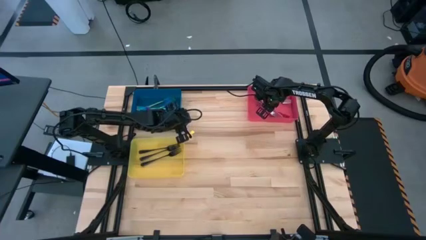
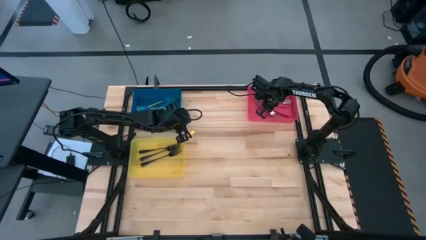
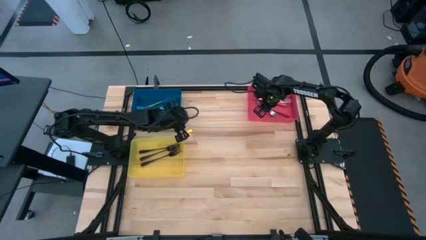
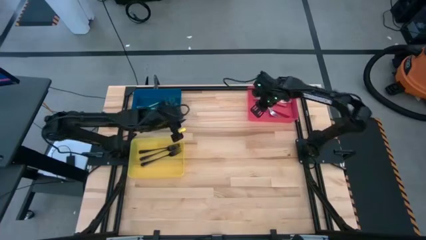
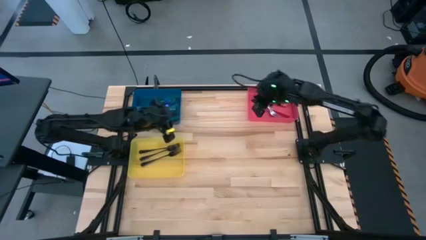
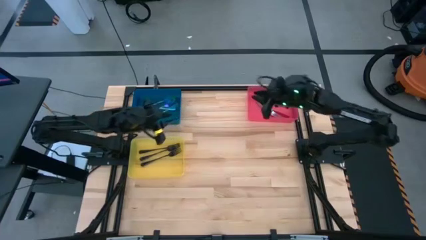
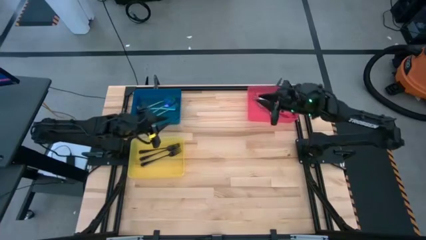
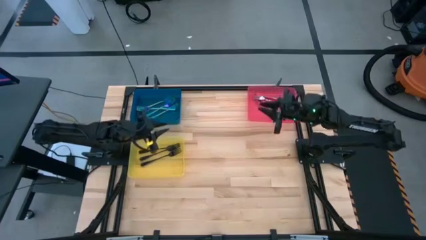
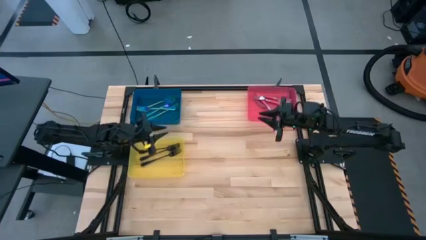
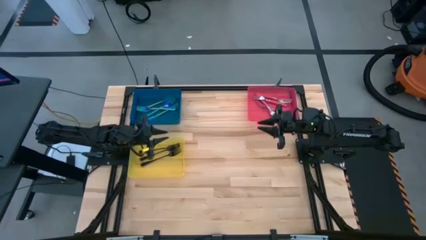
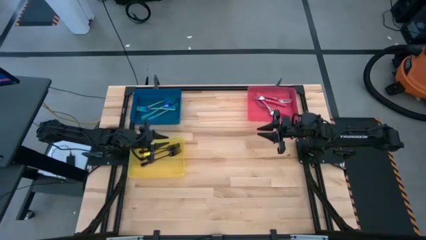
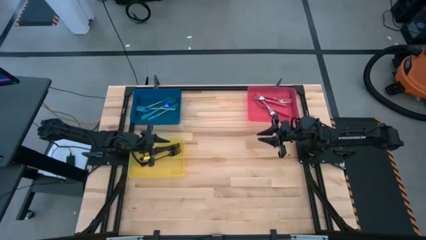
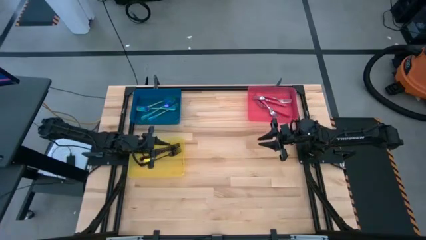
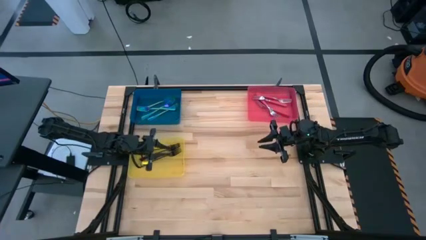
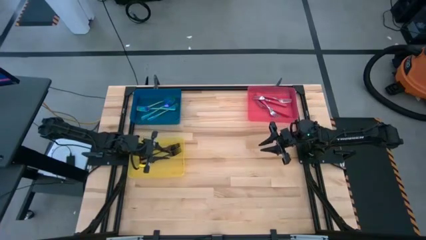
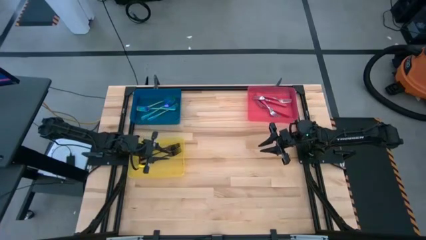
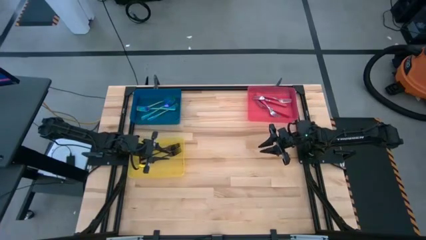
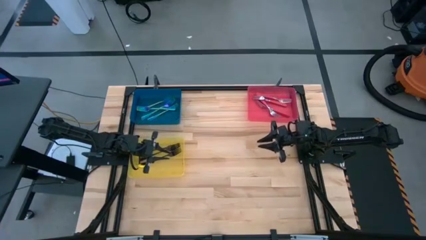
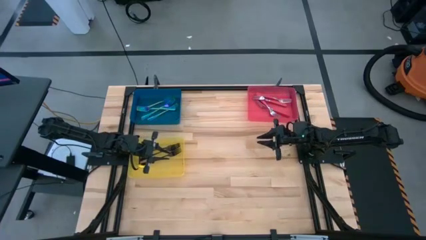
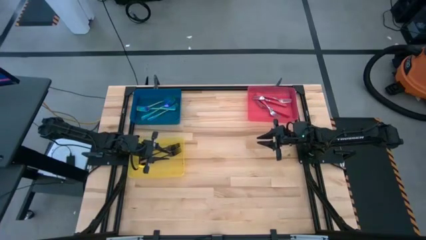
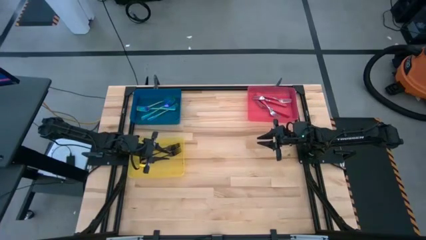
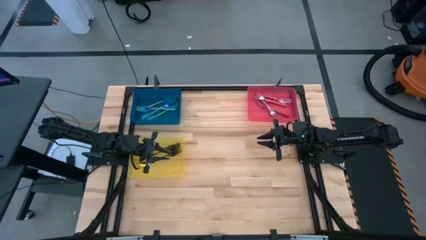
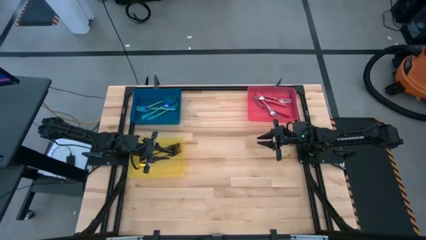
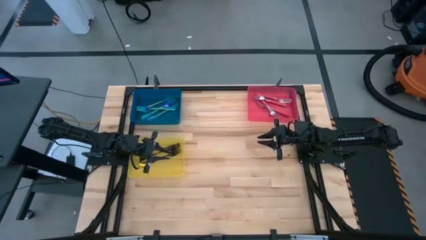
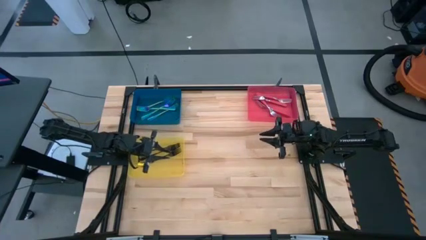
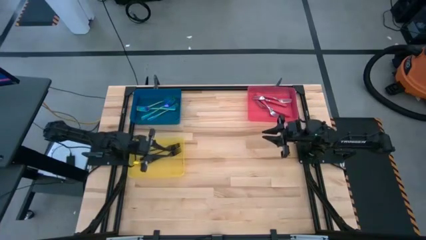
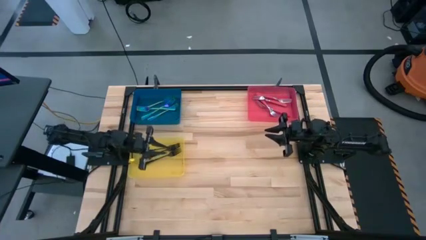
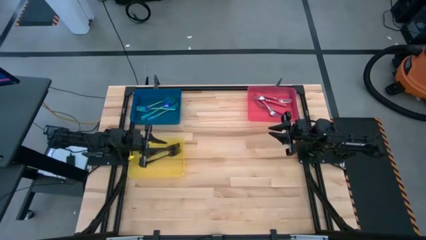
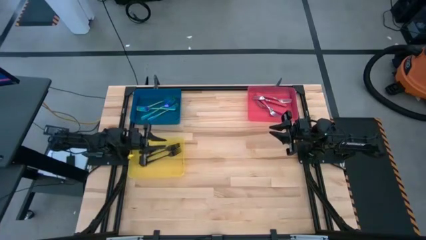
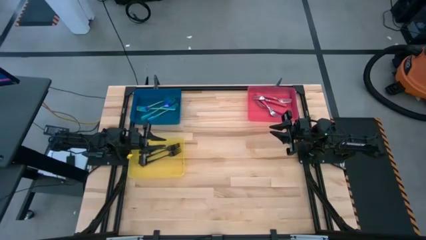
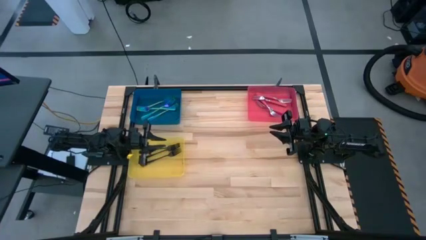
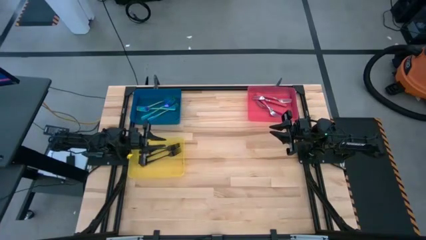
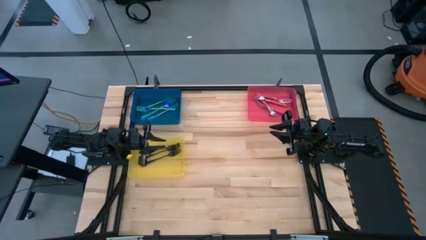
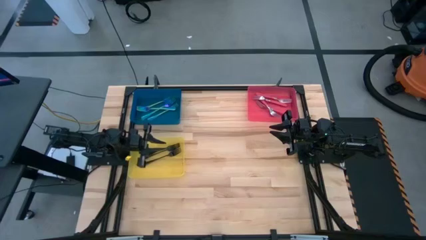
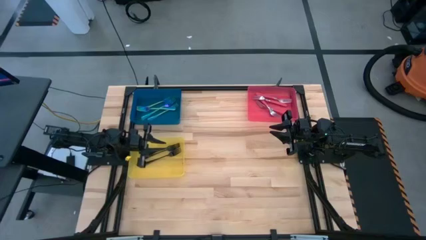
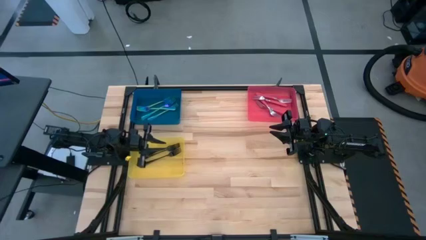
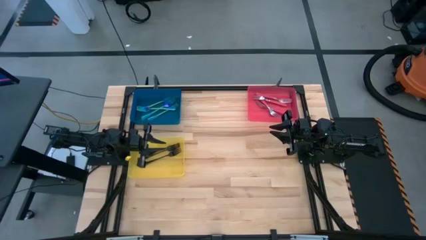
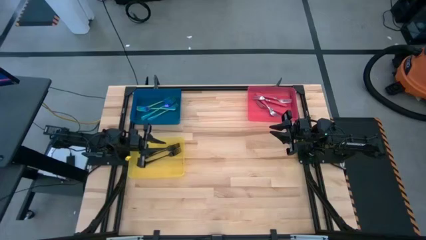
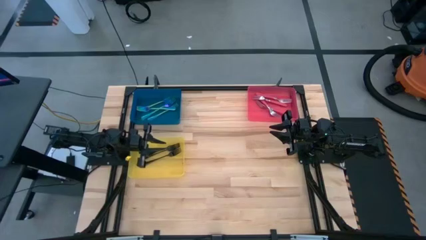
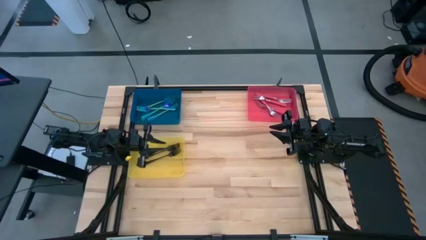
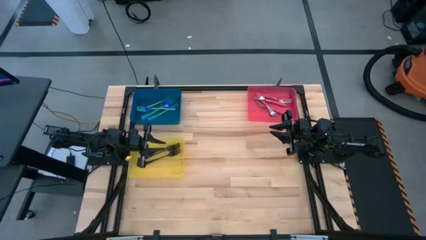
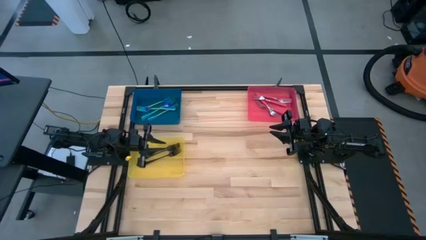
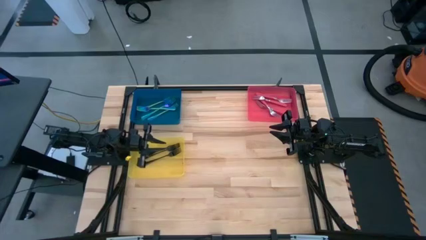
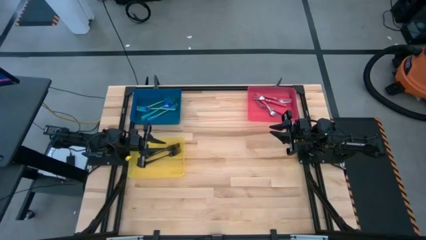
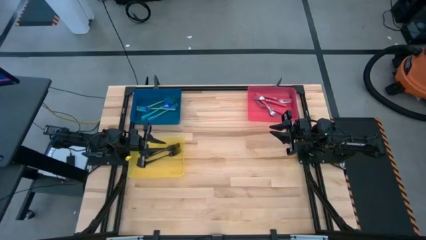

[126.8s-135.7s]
Task: Sort silverware by color (type)
Return to Home Position

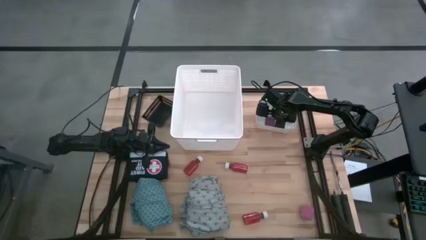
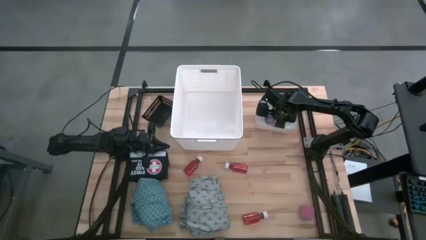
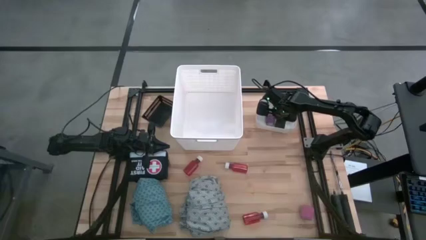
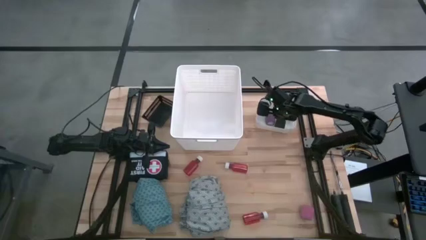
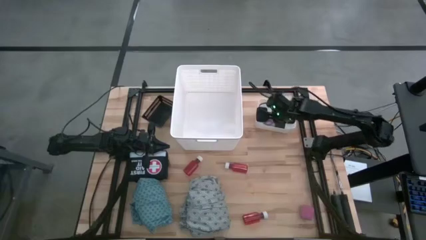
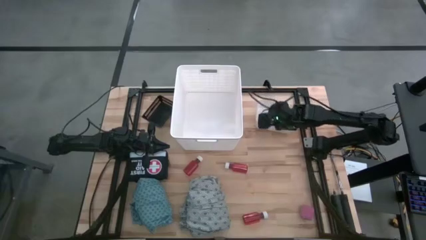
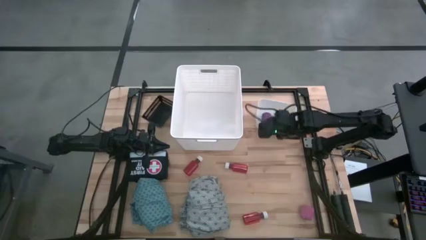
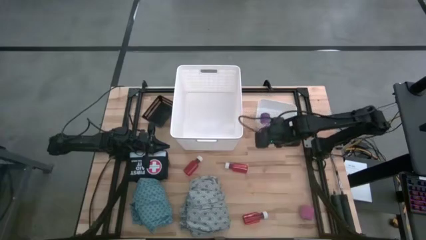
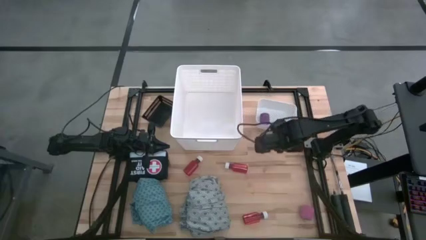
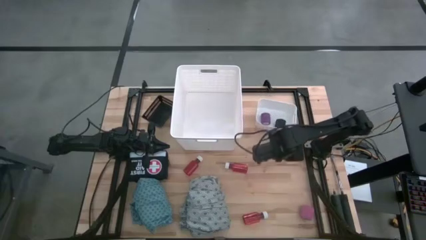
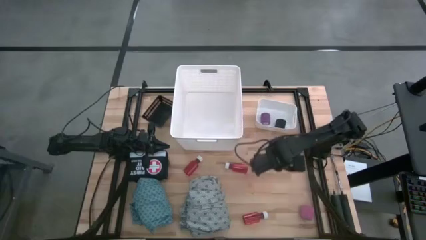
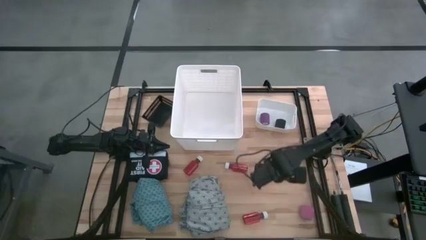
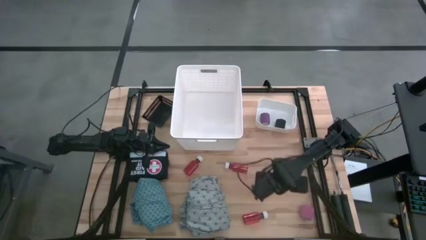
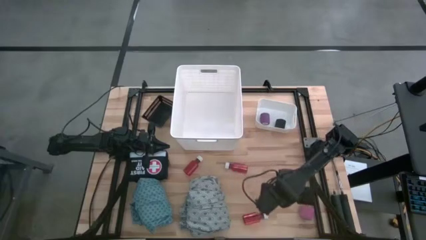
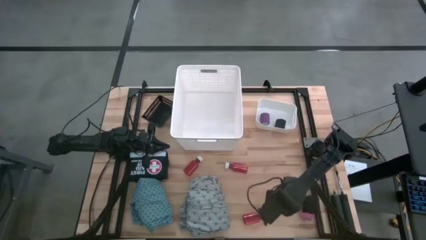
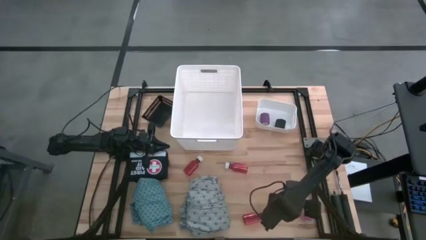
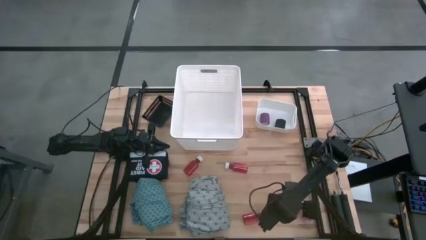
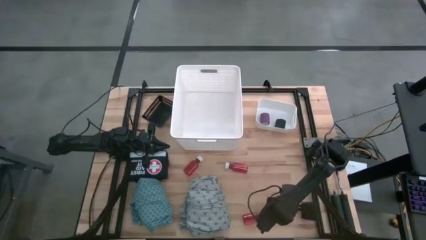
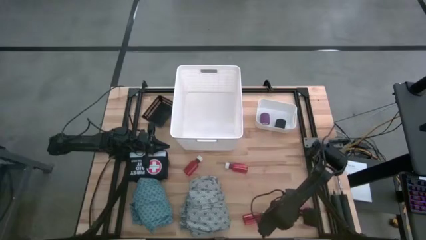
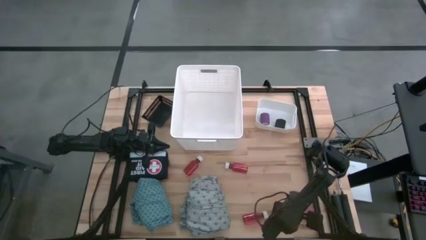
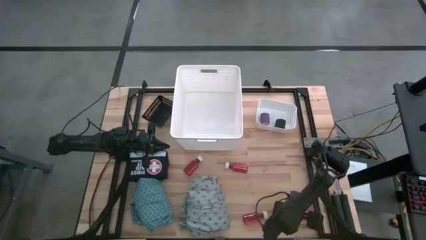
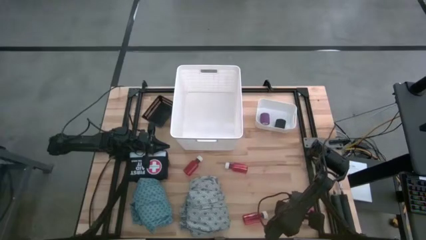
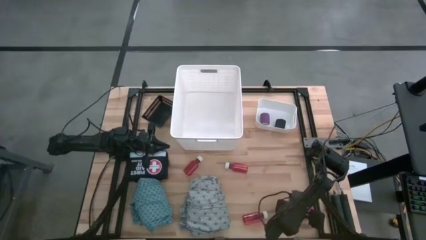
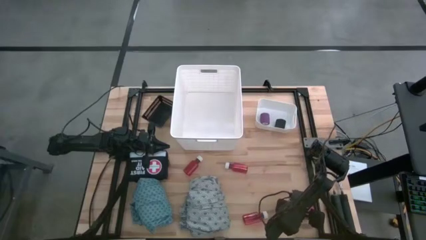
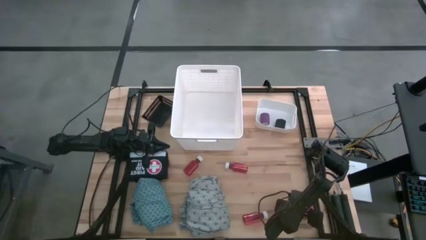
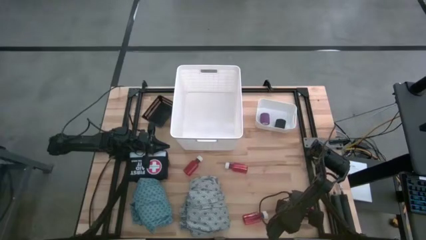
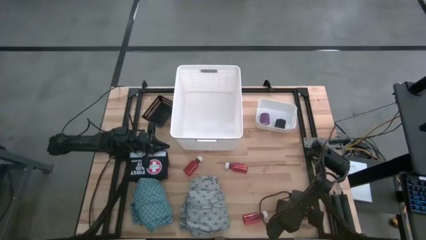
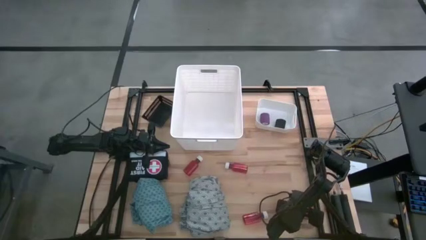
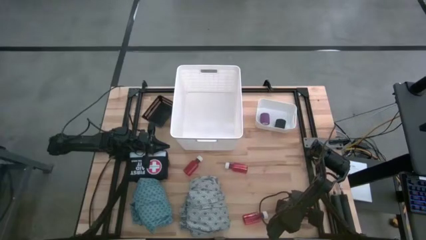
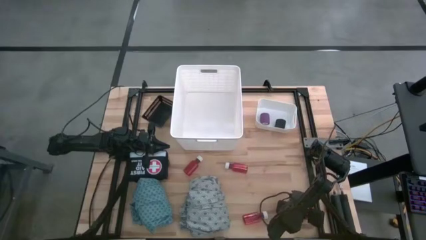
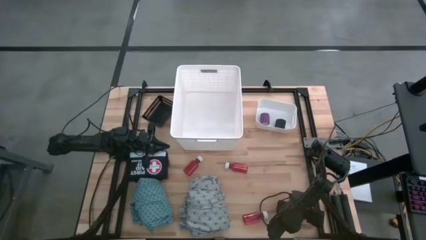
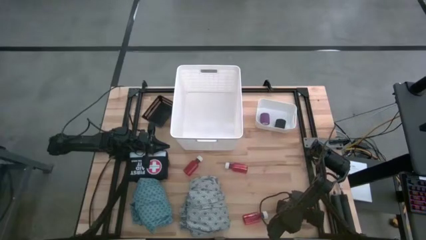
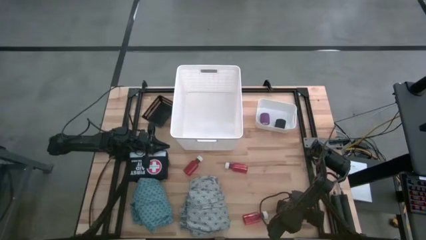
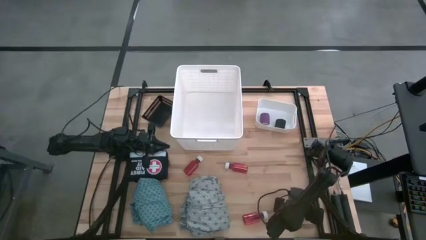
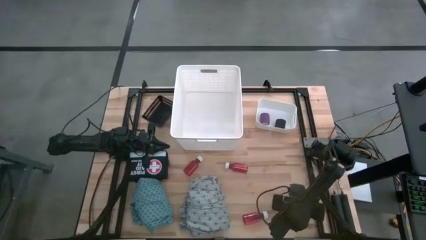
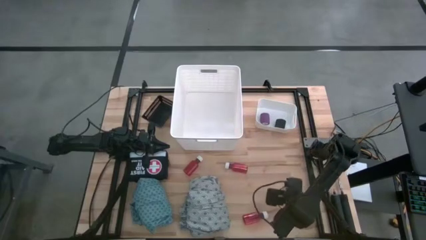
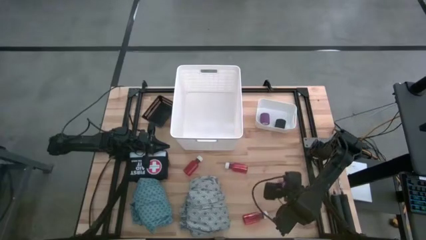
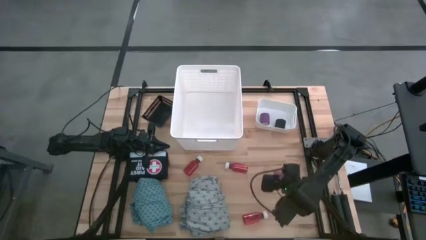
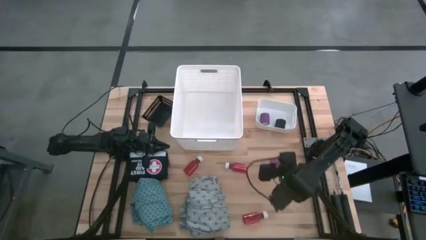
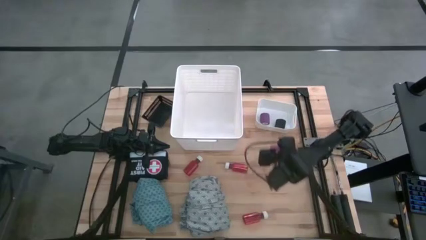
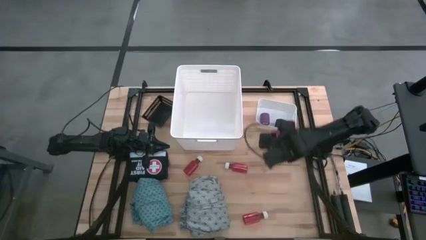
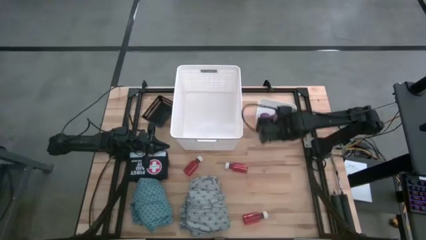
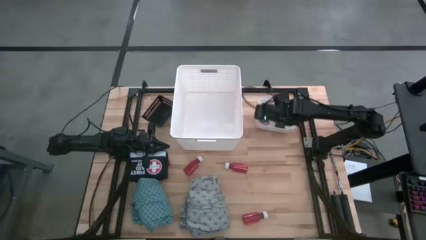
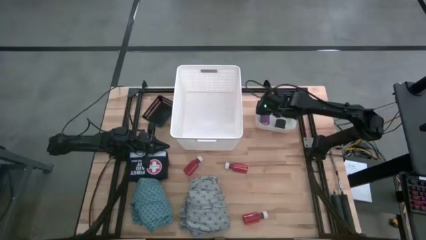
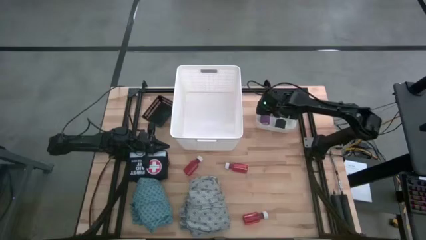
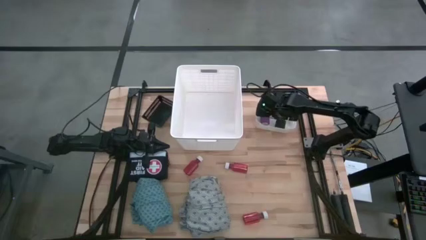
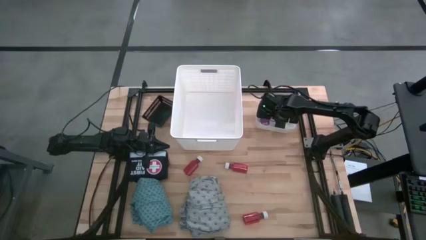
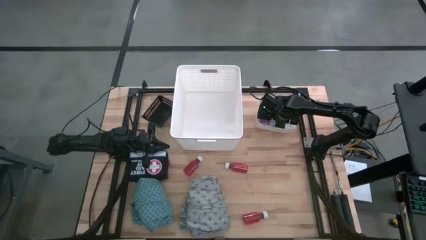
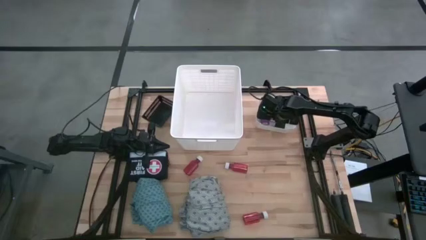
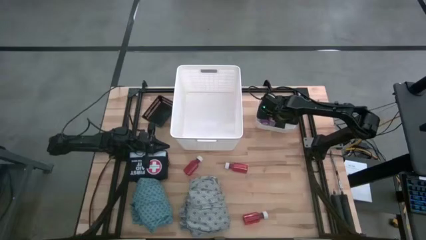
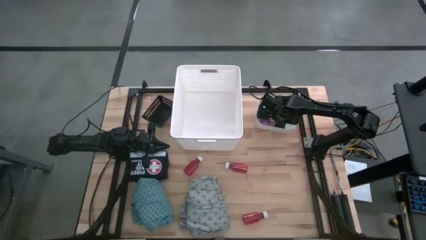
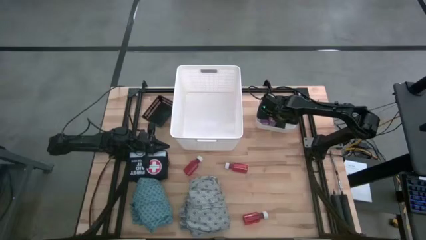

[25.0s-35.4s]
Task: Pick & Place Medicine items
Put the pink bandage into the white bin
